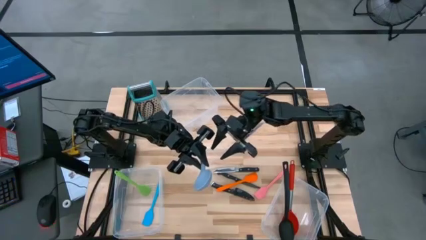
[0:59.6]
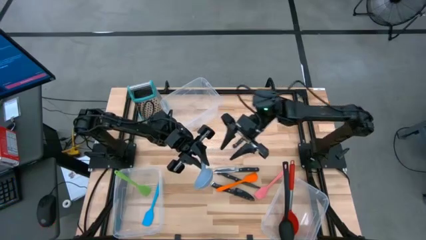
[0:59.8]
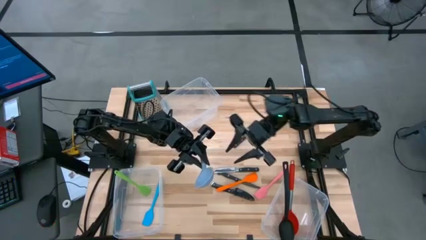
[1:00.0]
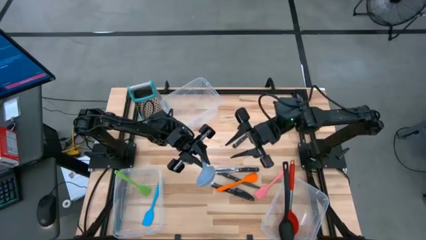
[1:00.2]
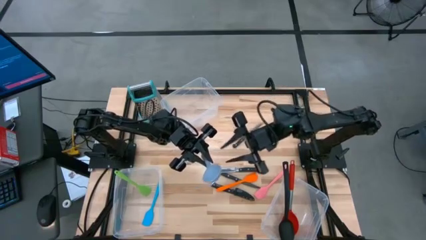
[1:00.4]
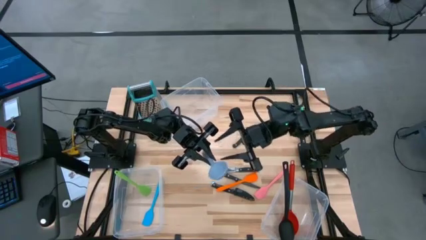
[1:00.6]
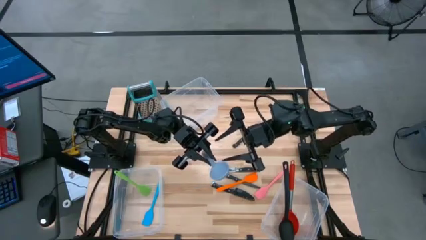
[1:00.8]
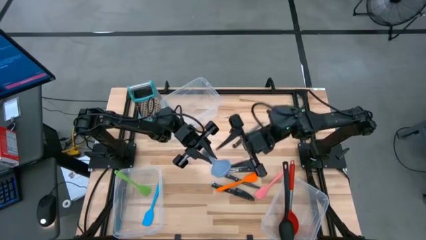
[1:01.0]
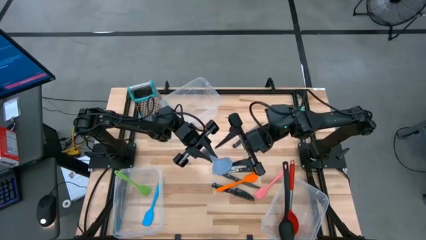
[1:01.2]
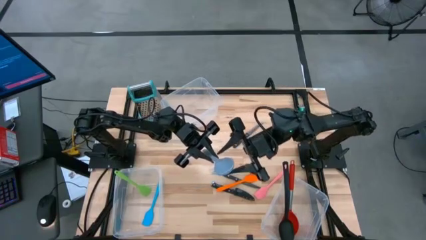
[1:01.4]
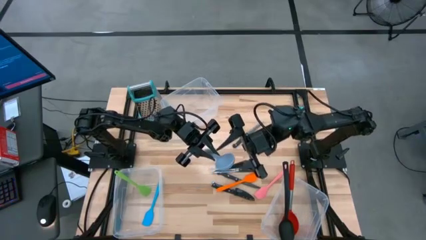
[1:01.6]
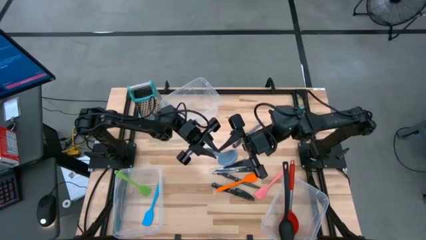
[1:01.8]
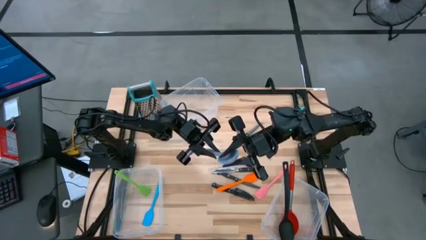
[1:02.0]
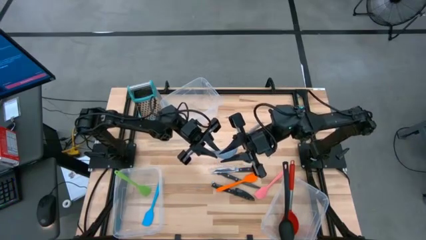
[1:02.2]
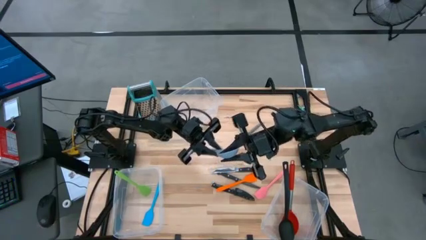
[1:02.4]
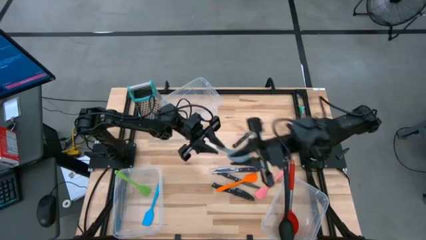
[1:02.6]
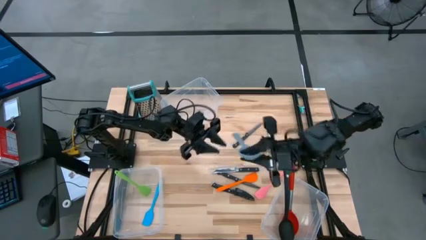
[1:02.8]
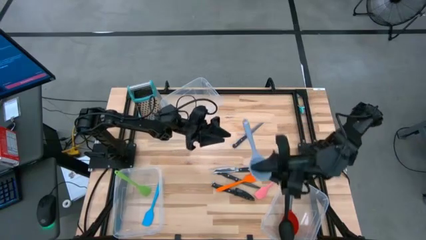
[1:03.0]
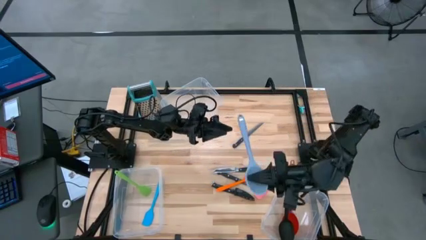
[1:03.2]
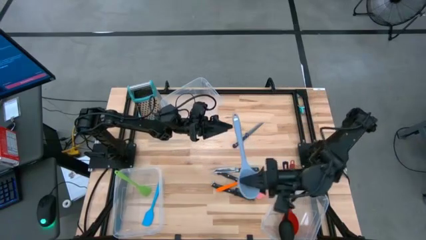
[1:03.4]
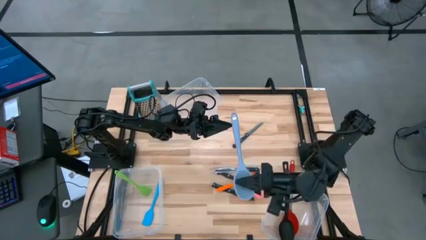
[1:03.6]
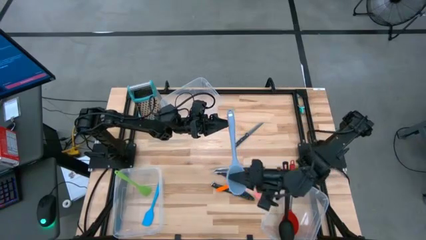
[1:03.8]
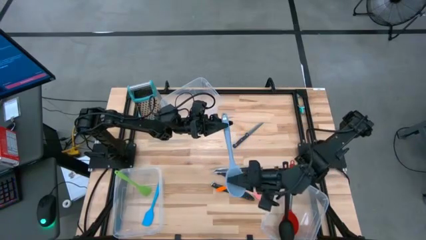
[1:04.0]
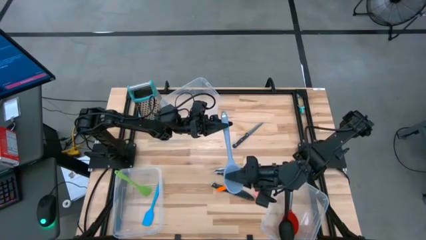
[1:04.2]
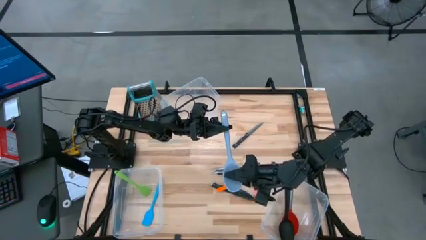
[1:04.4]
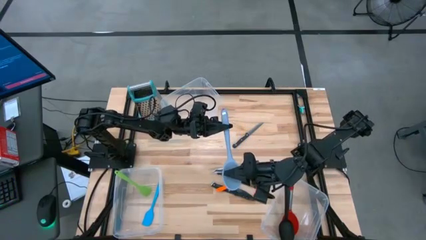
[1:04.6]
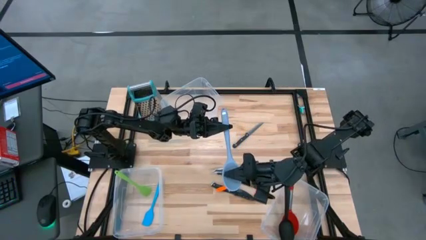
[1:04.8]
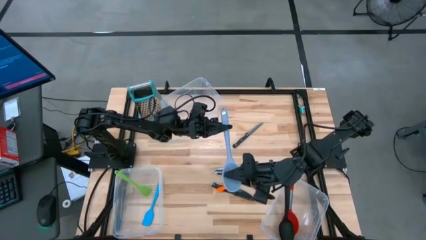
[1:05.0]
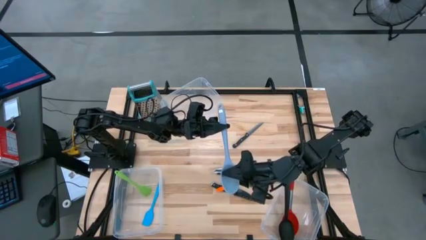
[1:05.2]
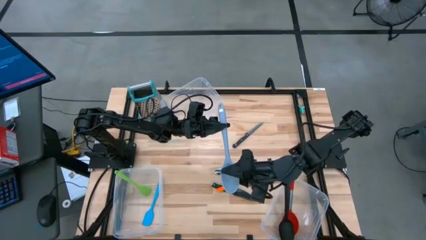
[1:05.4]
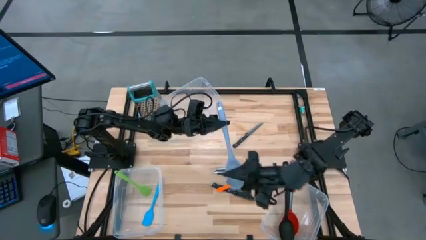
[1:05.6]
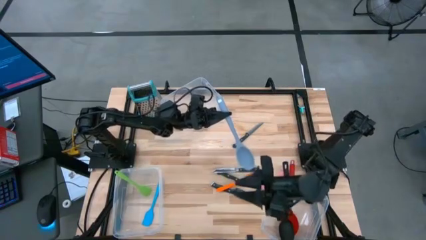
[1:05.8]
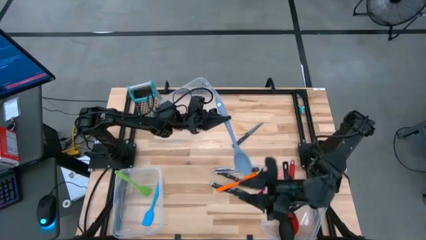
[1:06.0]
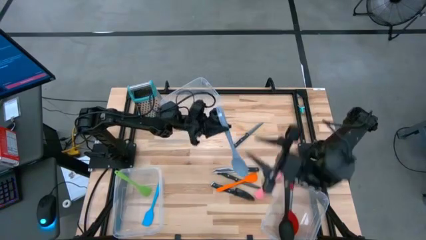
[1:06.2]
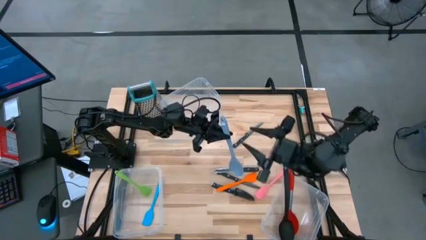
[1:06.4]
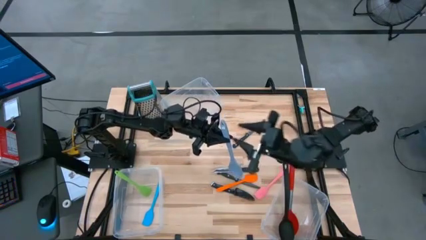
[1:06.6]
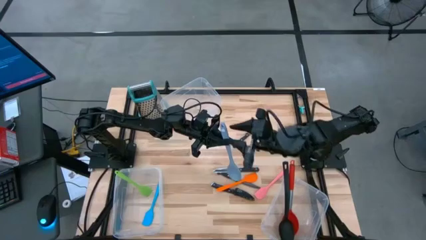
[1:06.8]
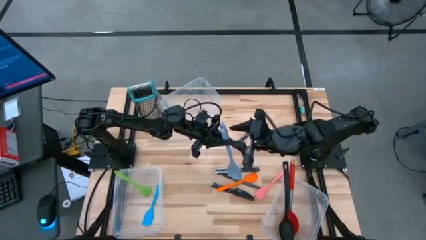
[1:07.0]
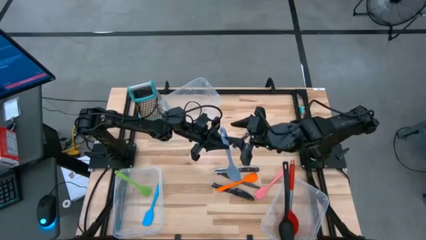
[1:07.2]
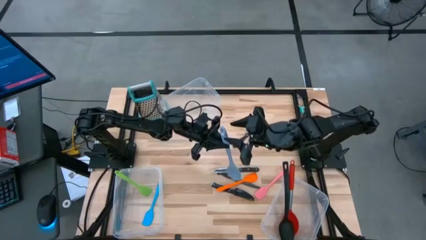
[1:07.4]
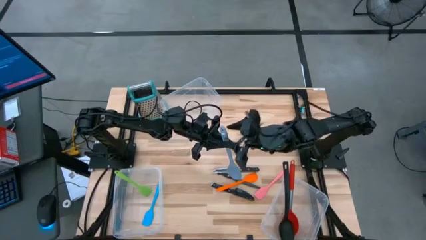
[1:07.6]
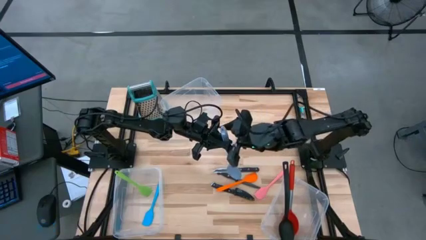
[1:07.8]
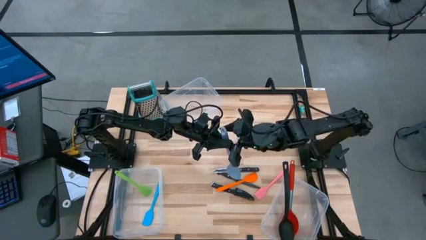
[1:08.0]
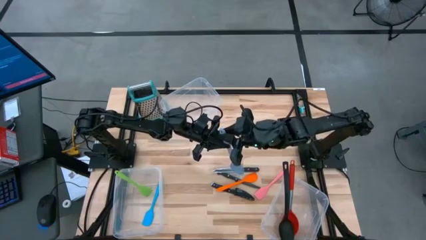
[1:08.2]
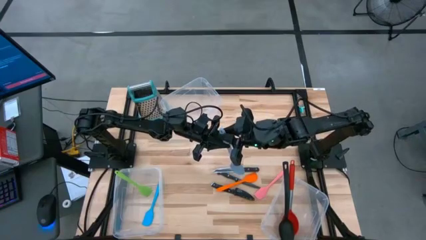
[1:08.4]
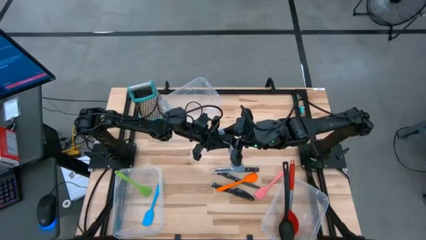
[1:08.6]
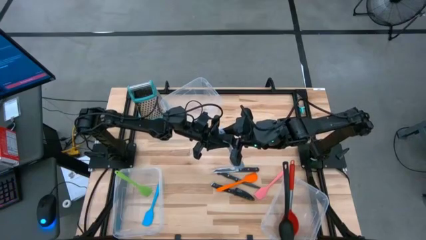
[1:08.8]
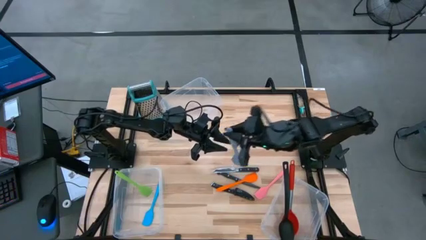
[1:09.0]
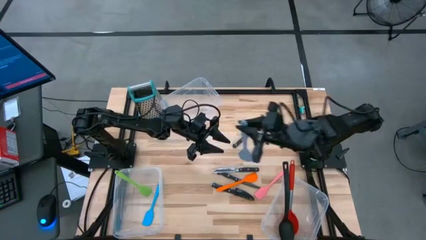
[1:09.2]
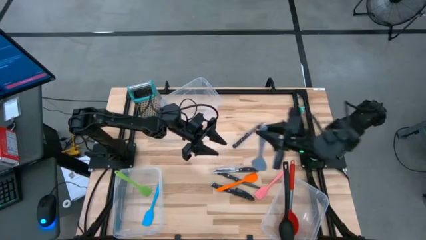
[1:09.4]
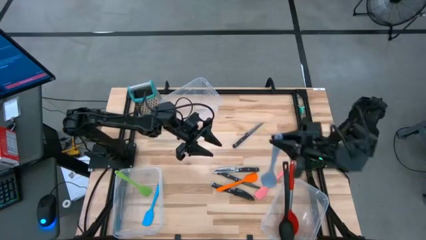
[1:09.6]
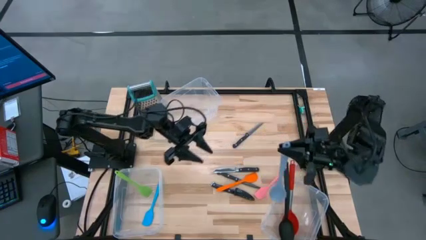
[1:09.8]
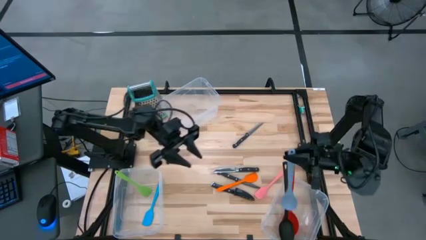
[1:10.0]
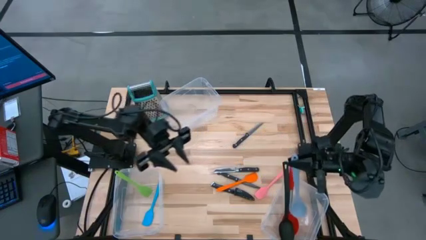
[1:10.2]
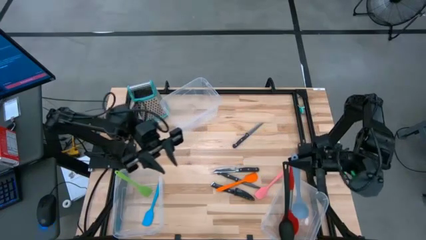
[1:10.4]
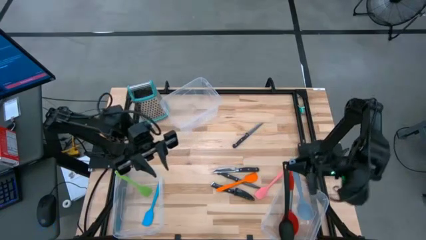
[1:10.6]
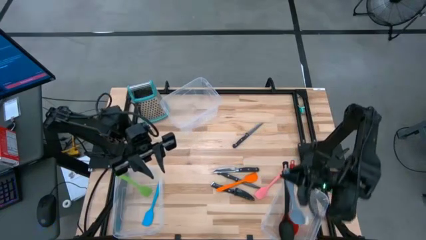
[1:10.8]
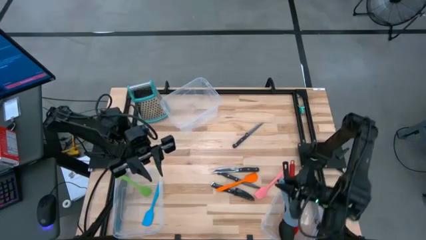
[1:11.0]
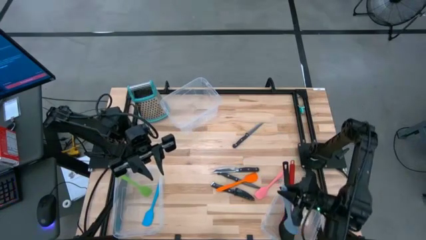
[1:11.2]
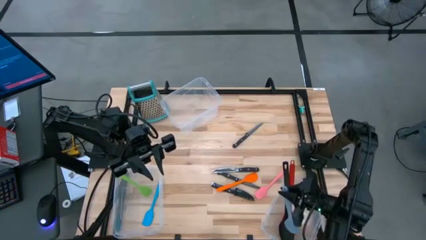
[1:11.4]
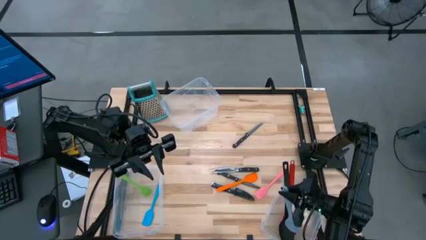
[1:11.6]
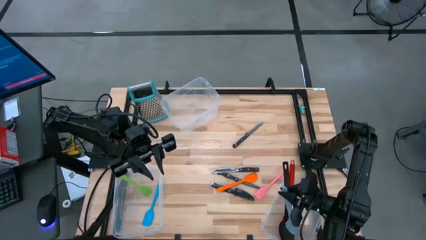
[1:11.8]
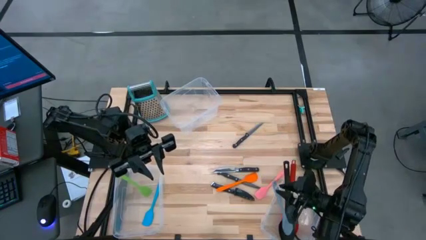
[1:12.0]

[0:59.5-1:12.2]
Task: Pick & Place Kitchen Items
Put the gray serving spoon into the bottom right transparent bin

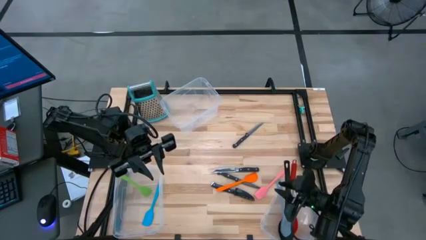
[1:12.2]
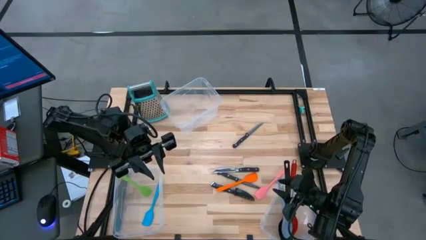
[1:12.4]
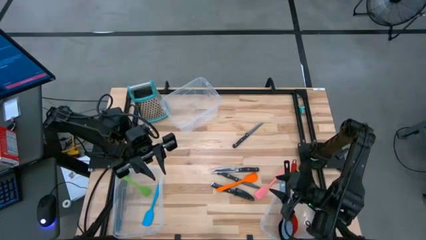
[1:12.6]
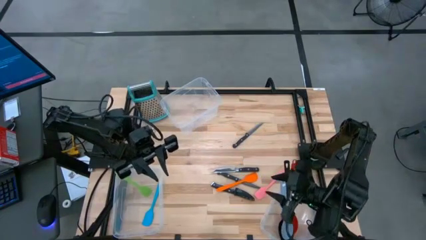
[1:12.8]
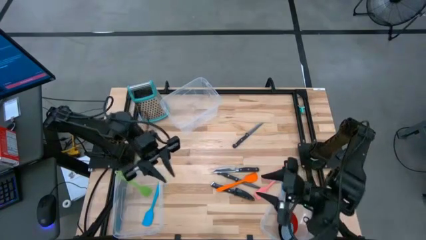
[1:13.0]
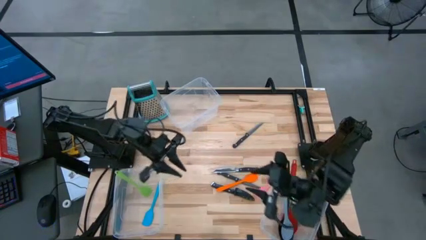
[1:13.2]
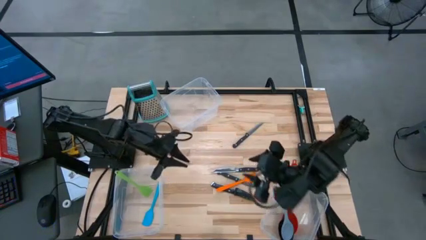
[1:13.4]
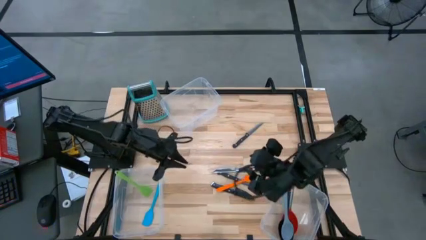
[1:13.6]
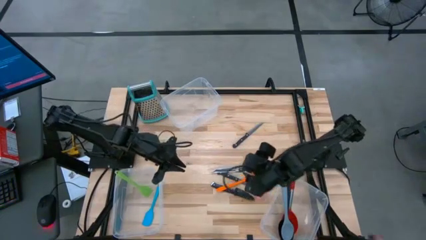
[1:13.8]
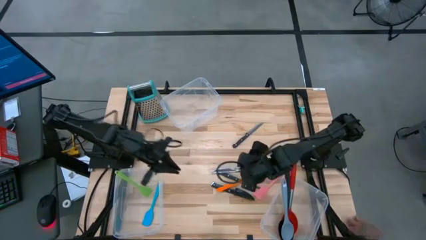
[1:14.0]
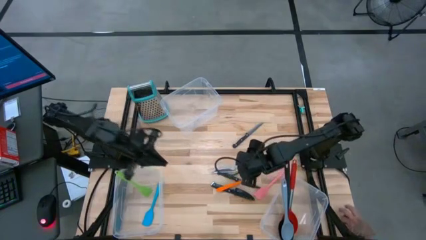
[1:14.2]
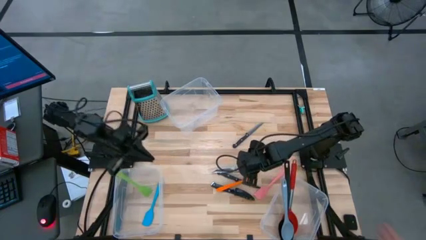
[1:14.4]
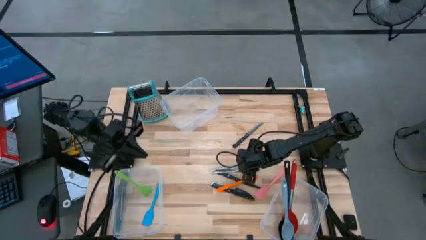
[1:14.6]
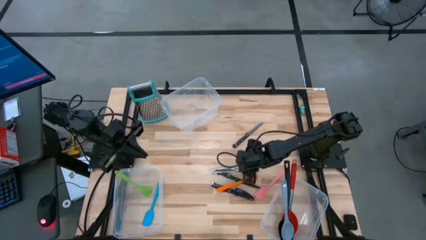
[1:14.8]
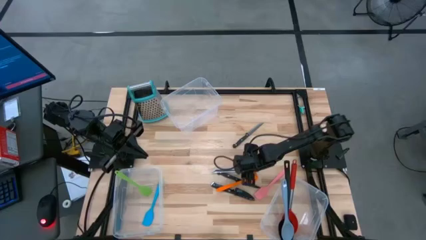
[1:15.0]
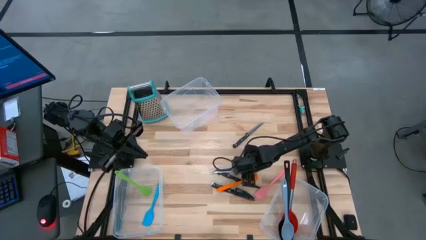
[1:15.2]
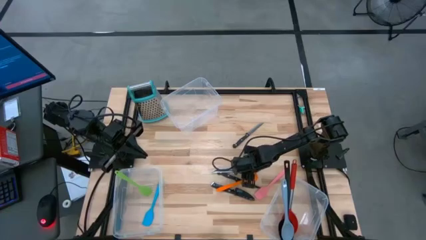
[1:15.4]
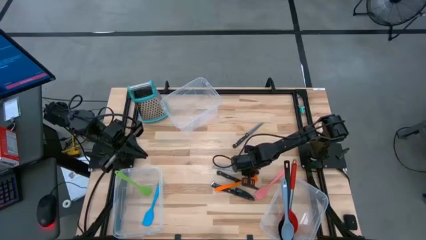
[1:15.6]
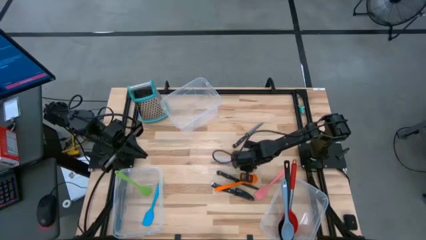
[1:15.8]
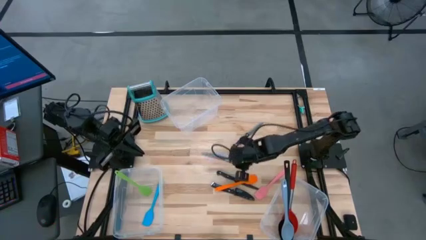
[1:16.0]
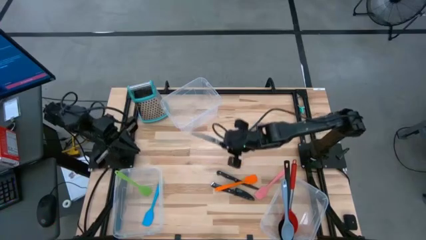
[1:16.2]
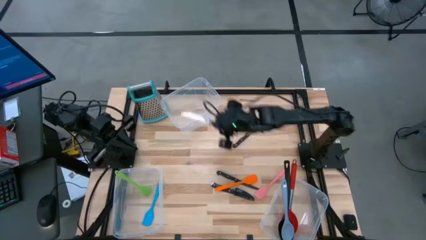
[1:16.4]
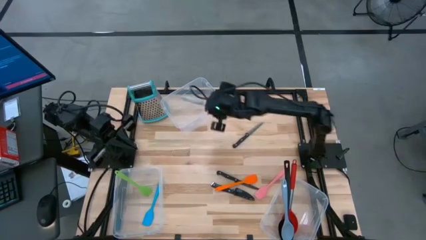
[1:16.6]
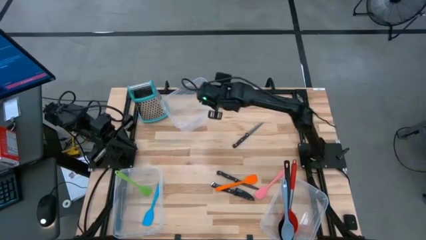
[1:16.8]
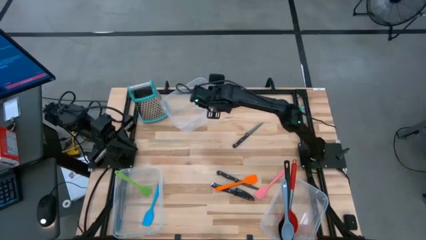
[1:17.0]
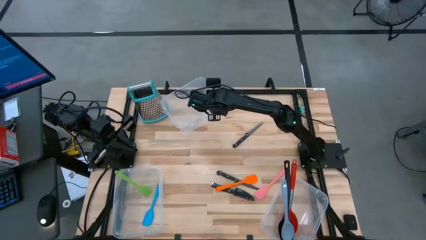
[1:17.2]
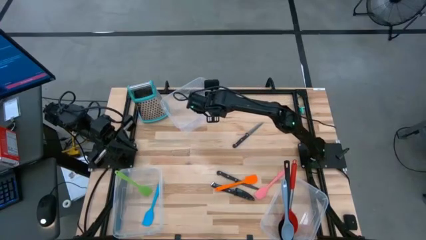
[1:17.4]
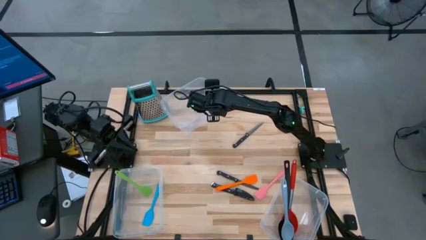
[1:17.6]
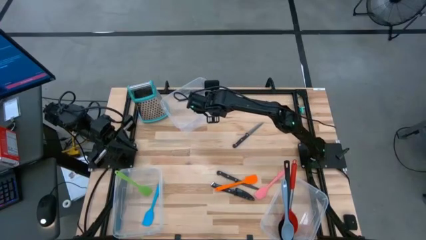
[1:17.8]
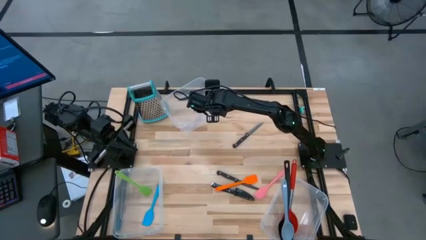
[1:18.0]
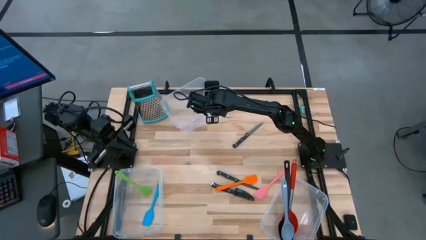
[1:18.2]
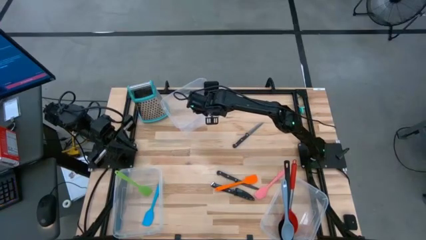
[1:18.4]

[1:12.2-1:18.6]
Put the black knife into the top transparent bin
